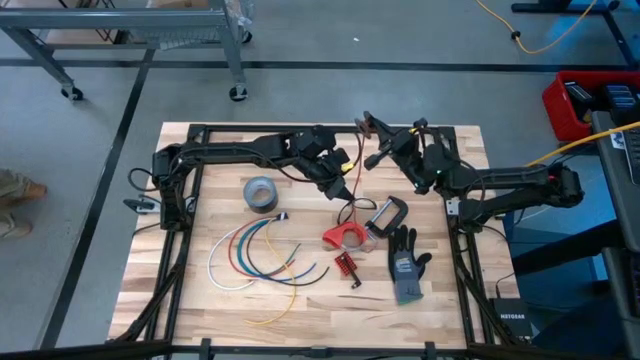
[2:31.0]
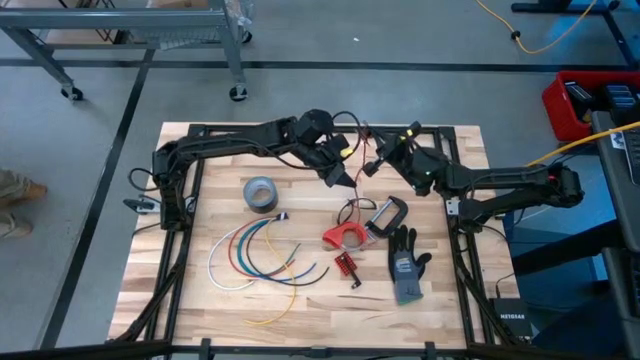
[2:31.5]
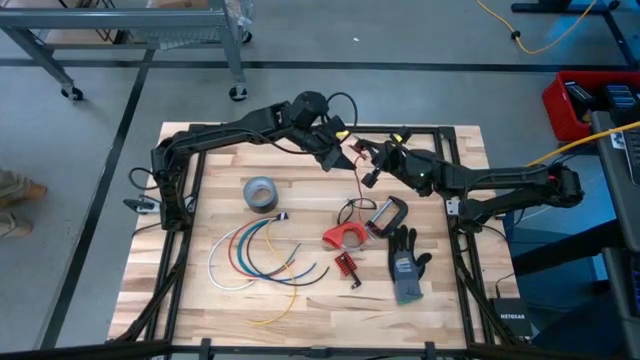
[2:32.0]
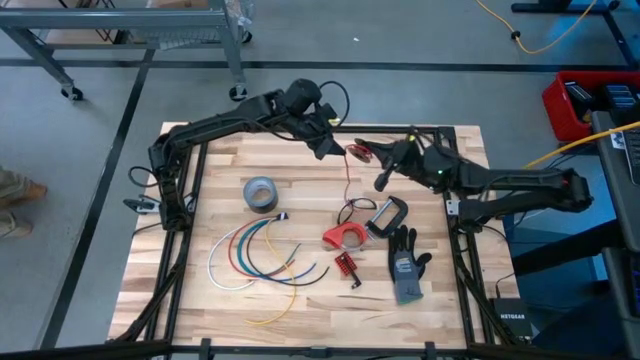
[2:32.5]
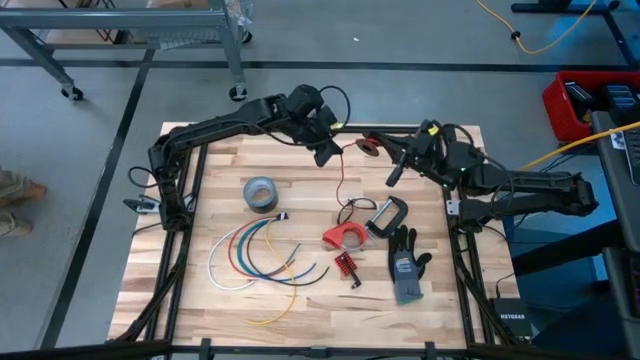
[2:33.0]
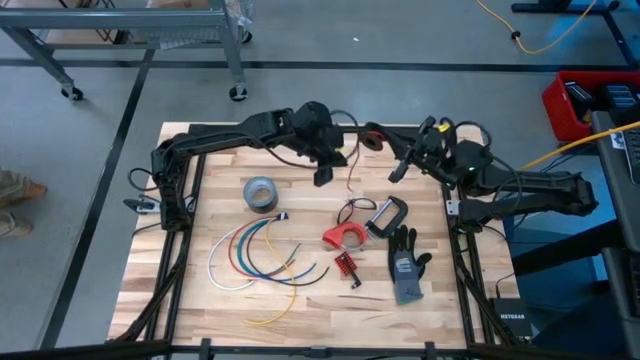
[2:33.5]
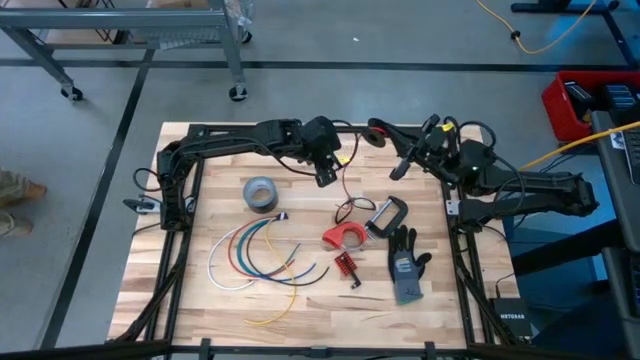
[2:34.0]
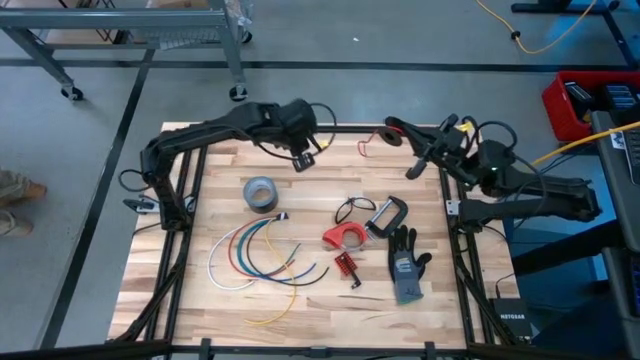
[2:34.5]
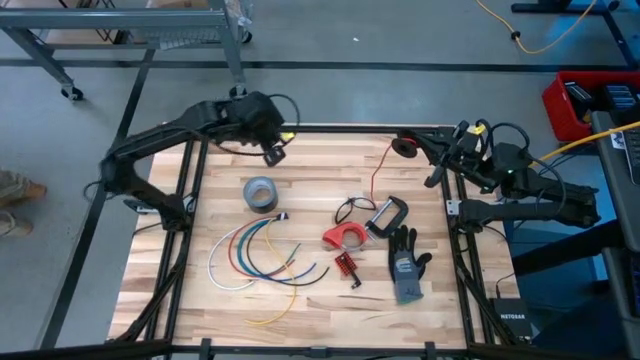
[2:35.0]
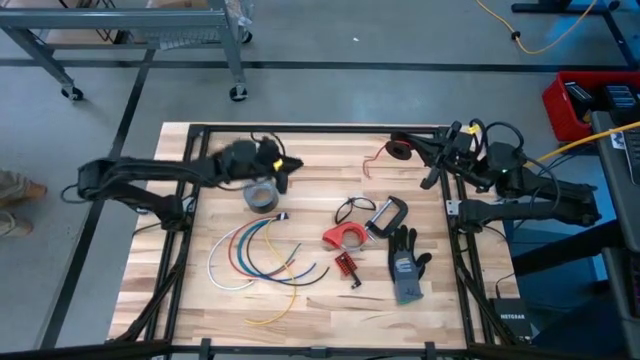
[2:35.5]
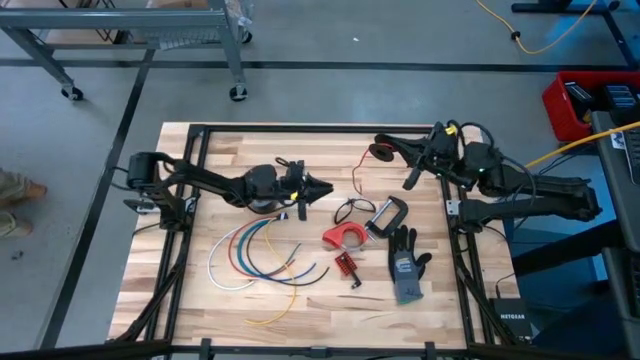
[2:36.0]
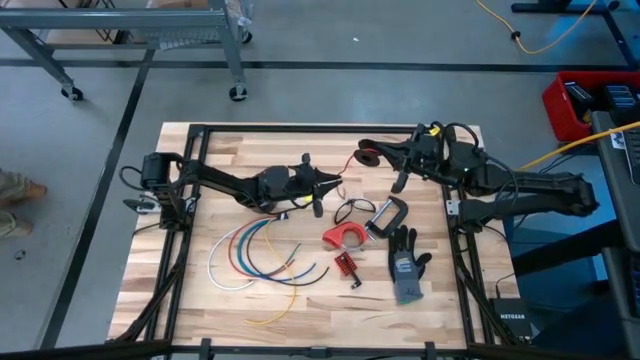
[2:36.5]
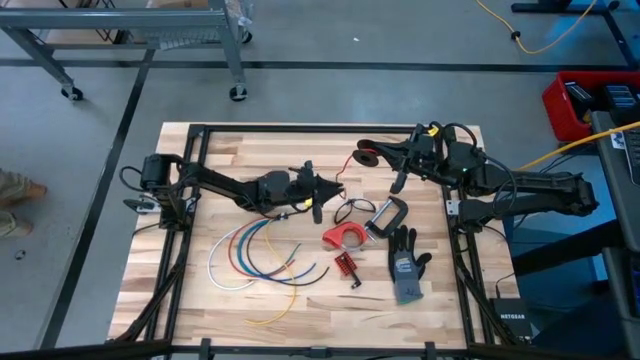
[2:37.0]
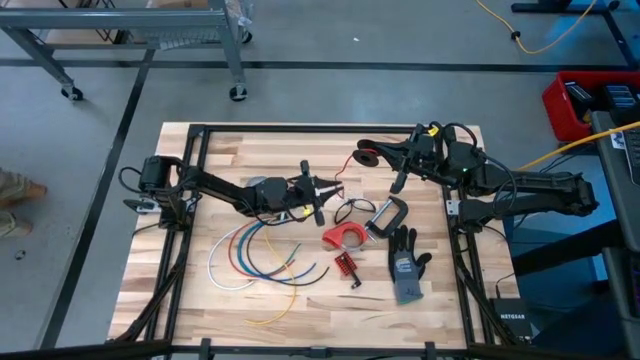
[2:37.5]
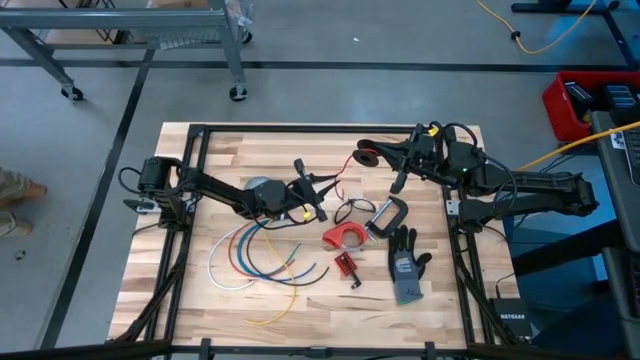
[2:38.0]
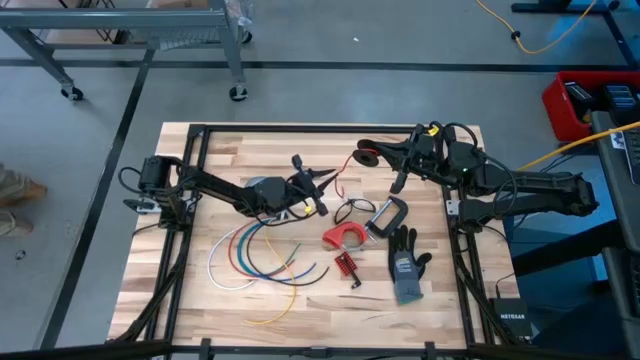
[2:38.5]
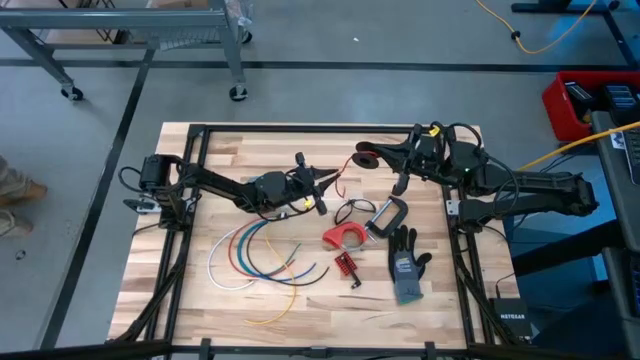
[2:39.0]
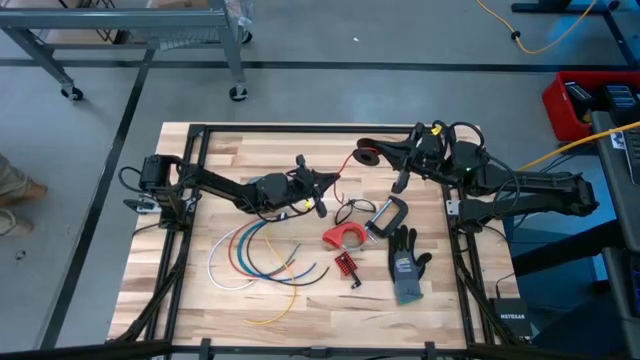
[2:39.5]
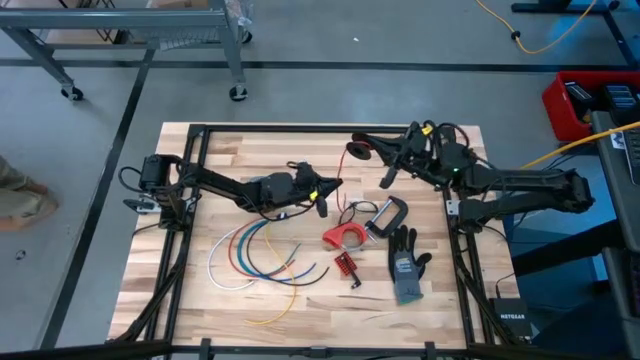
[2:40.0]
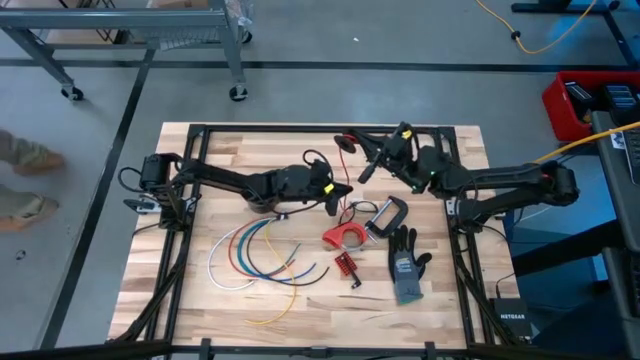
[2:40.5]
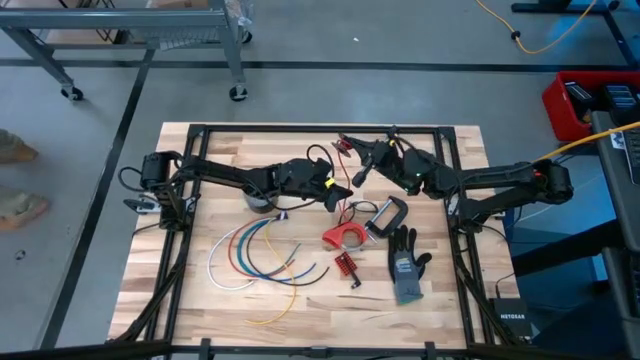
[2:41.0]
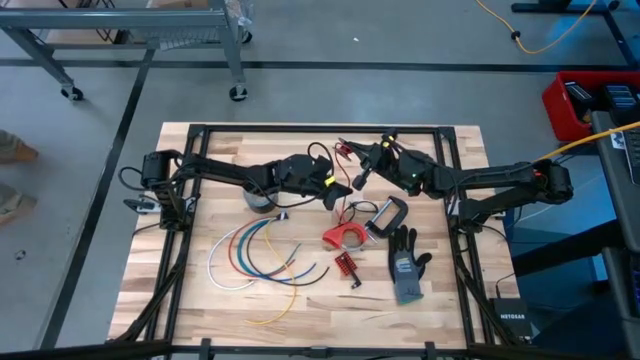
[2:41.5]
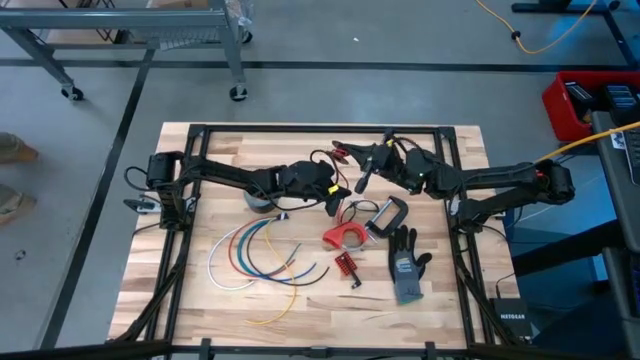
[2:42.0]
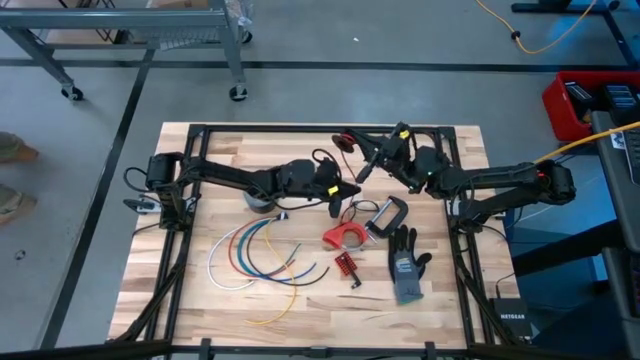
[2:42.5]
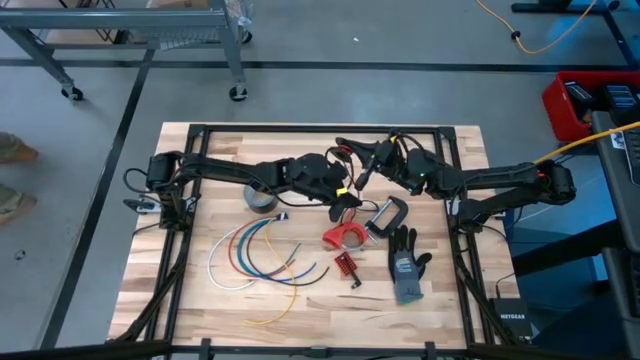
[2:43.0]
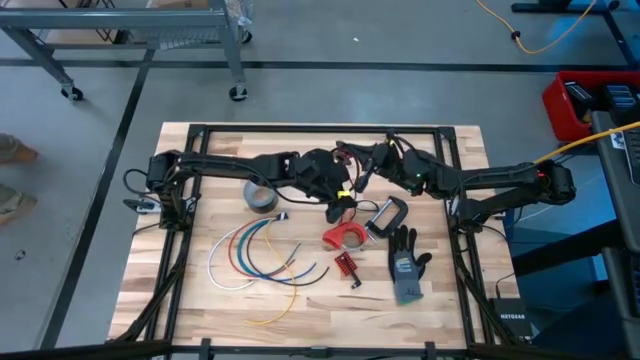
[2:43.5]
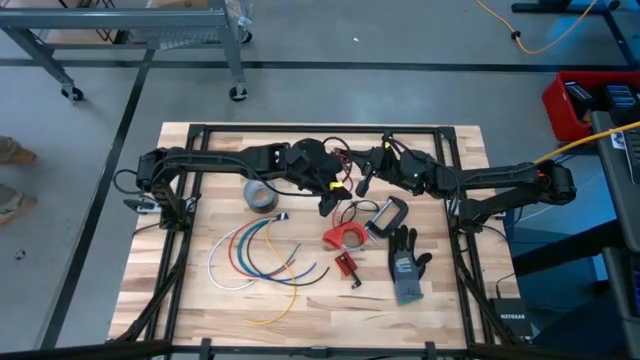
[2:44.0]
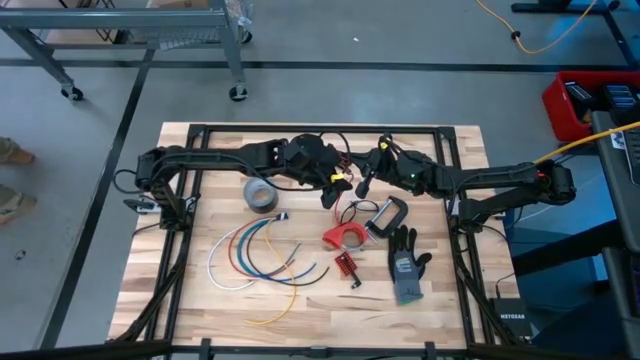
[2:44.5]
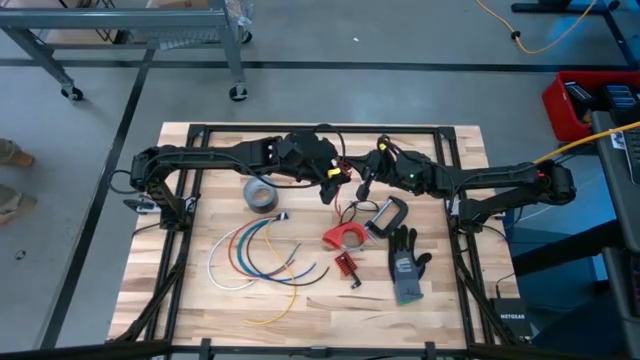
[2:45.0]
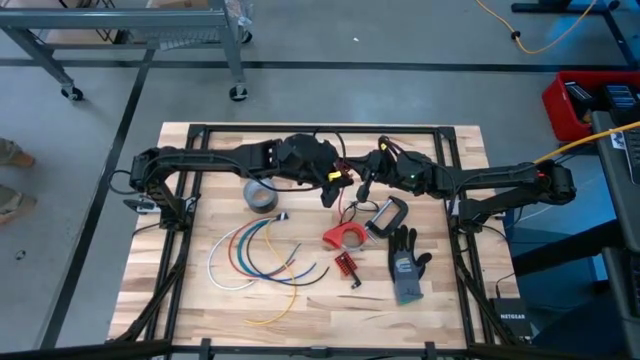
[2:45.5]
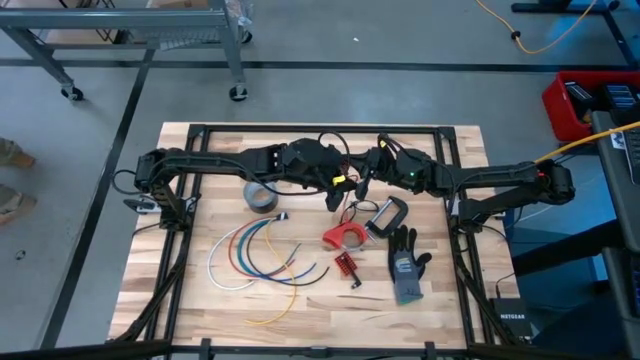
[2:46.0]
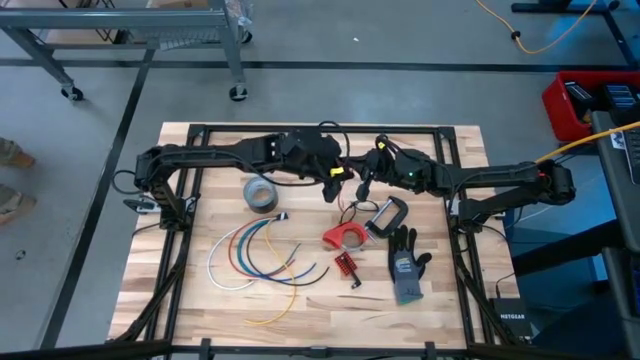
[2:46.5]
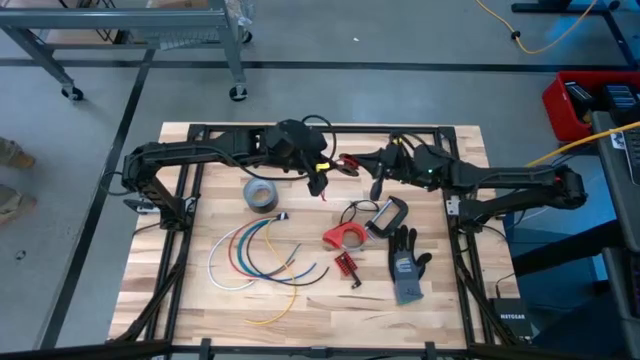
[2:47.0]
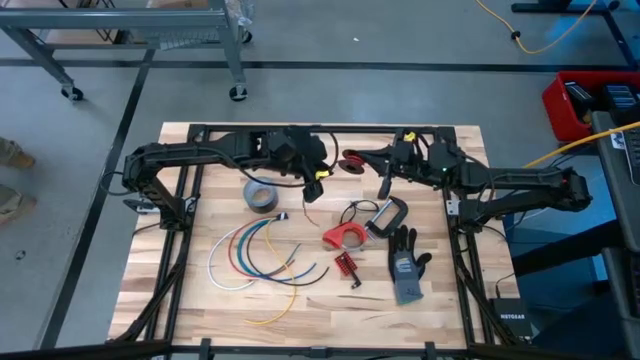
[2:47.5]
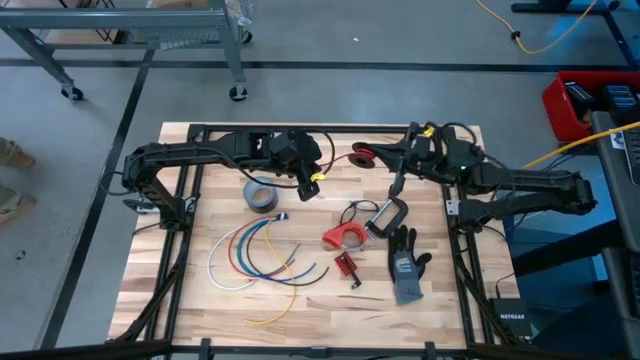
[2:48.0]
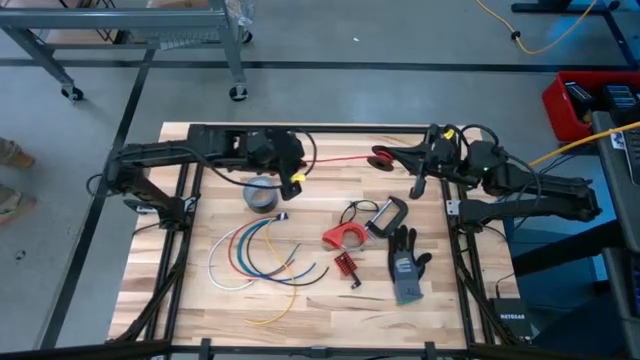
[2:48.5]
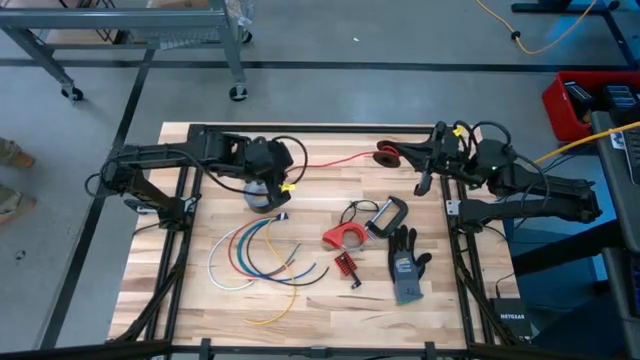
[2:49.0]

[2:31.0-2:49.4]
Task: Coil cords
Coil the red wire onto the spool

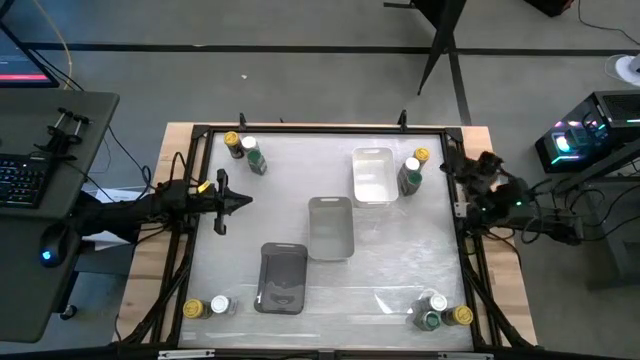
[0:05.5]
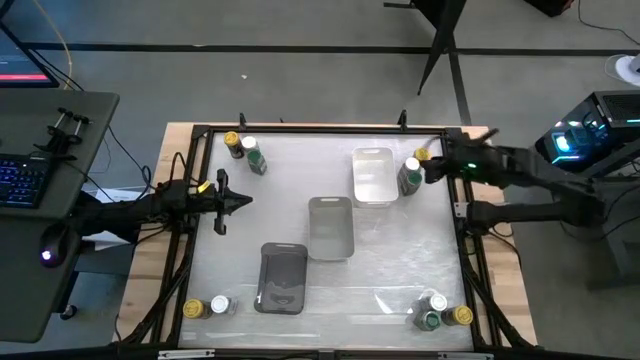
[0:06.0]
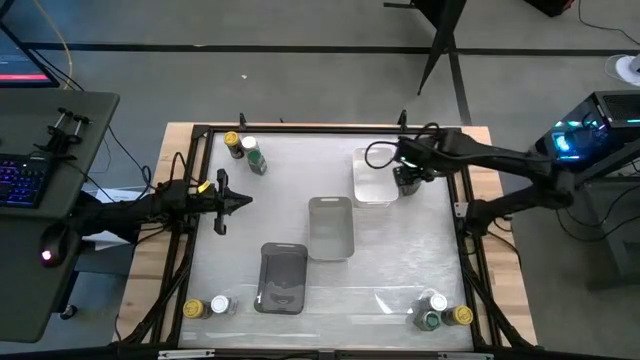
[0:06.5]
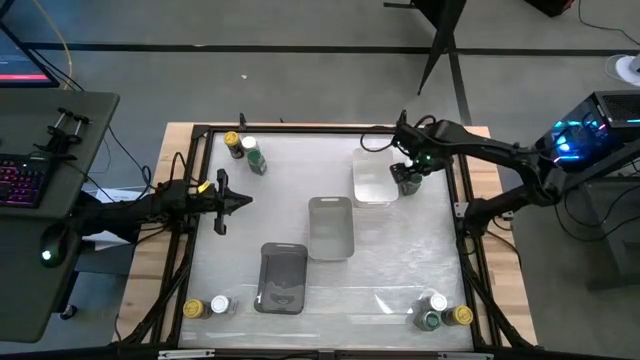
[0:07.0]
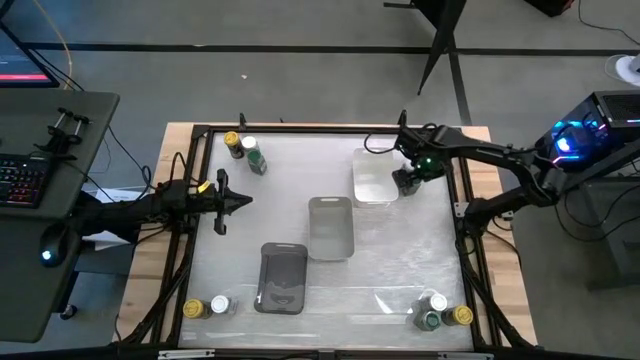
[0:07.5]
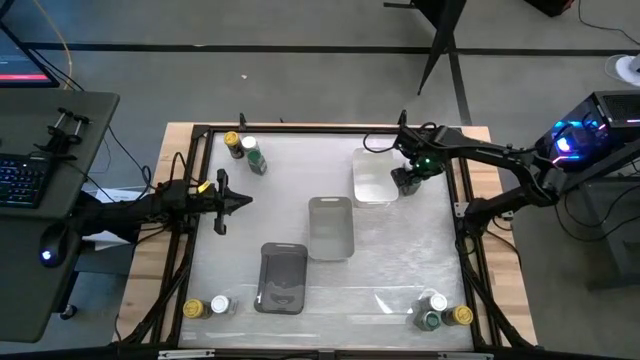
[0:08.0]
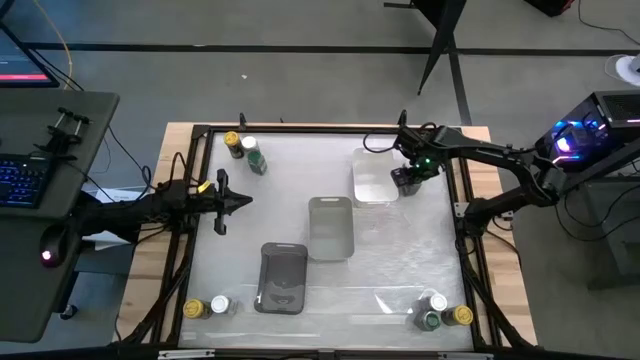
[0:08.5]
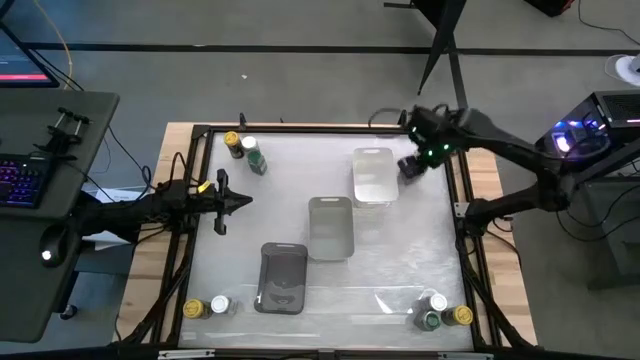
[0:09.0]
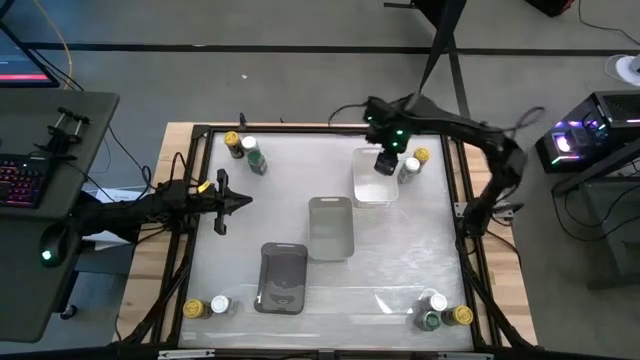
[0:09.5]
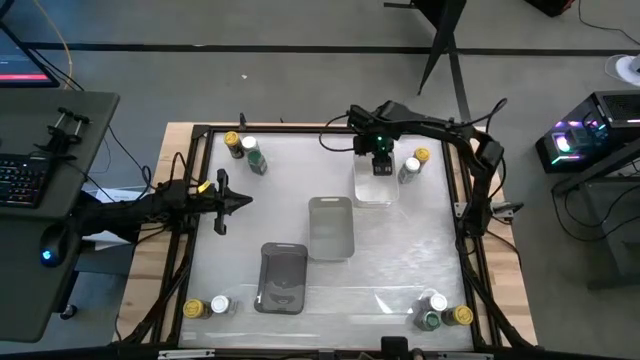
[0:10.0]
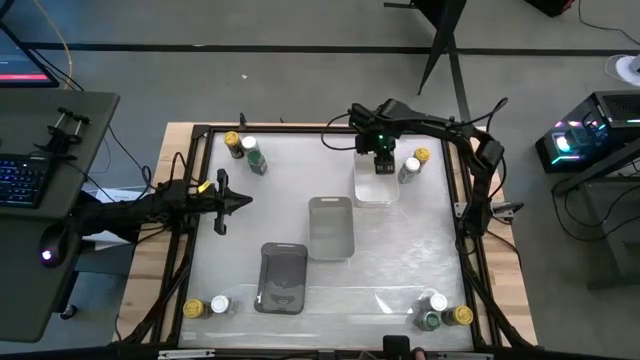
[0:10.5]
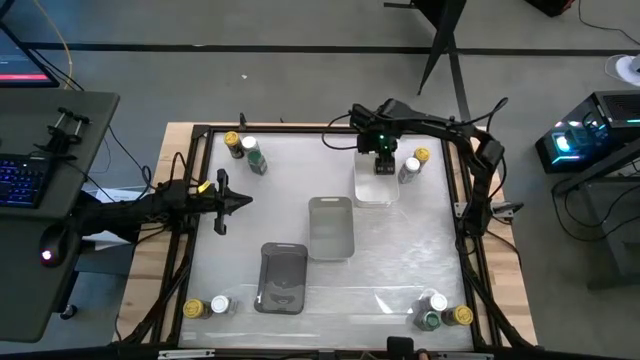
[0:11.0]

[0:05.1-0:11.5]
Task: Sort spices by type
Put the green seasoning bottle into the white bin
